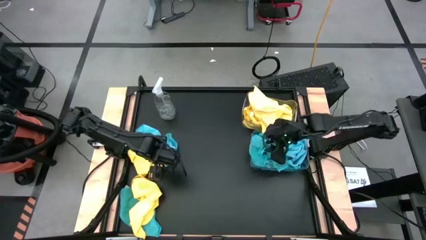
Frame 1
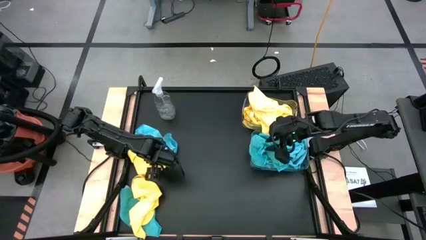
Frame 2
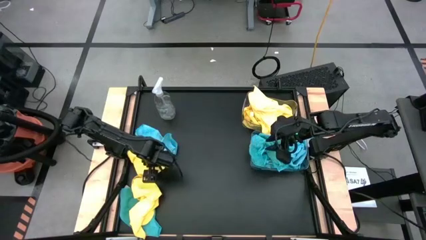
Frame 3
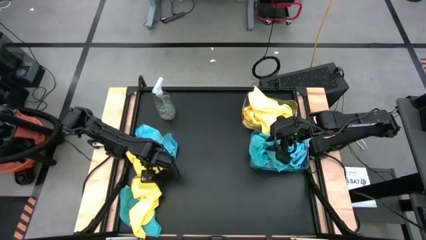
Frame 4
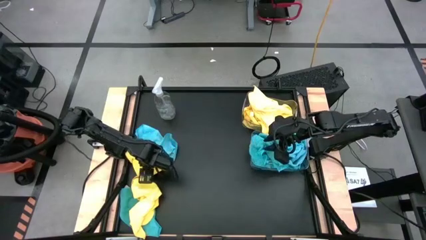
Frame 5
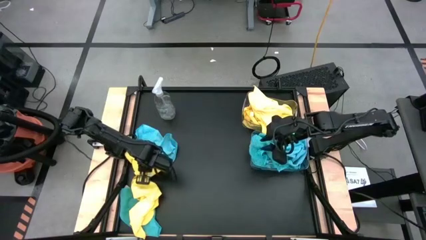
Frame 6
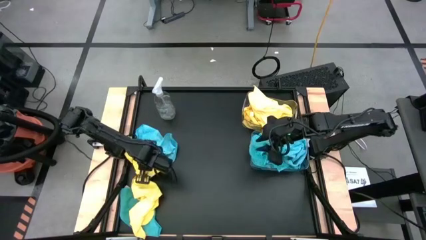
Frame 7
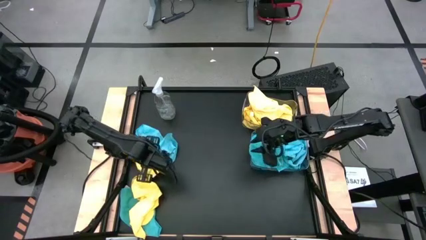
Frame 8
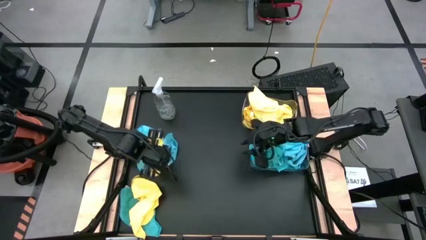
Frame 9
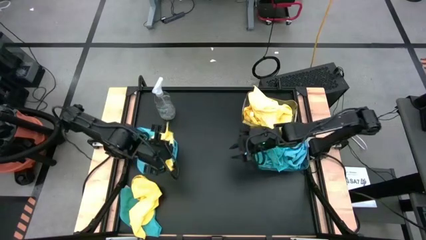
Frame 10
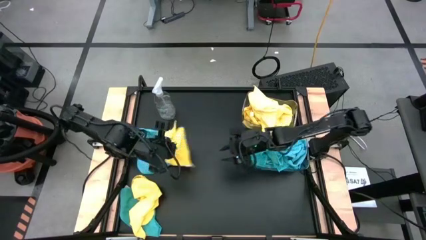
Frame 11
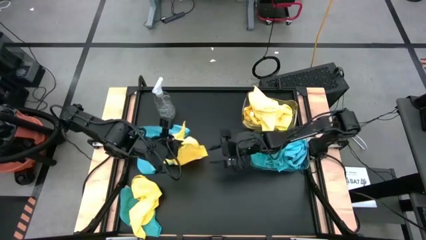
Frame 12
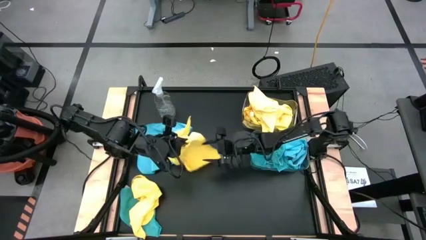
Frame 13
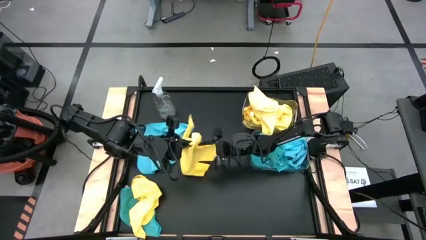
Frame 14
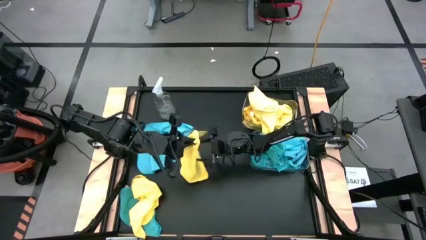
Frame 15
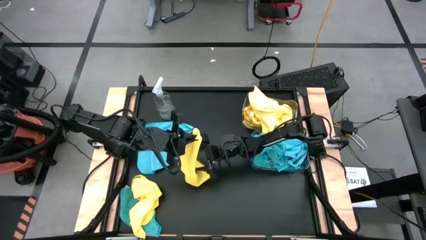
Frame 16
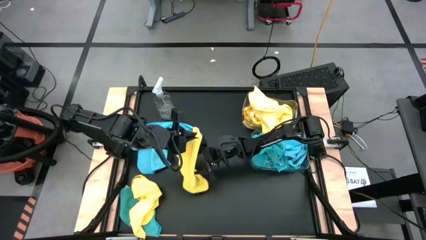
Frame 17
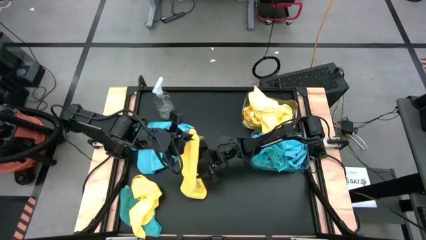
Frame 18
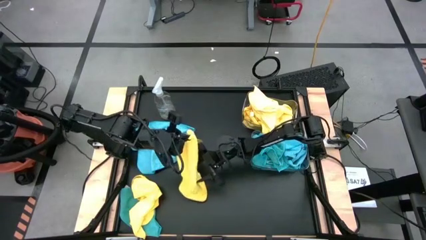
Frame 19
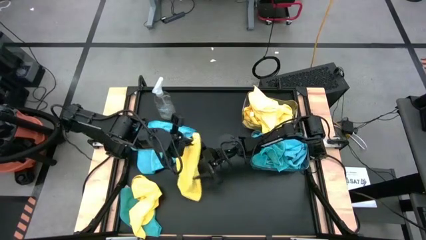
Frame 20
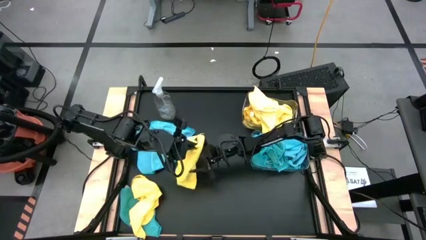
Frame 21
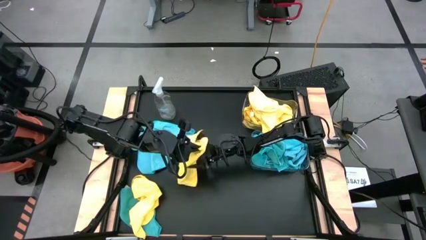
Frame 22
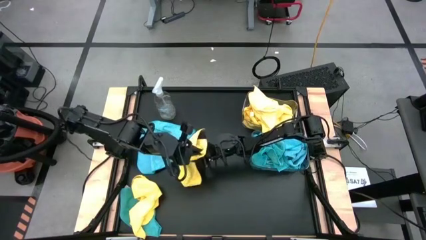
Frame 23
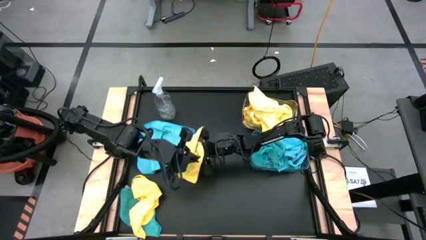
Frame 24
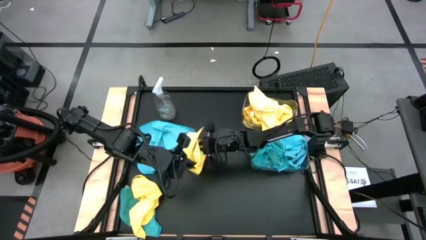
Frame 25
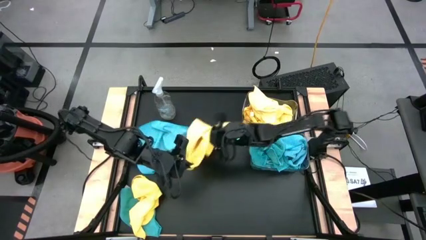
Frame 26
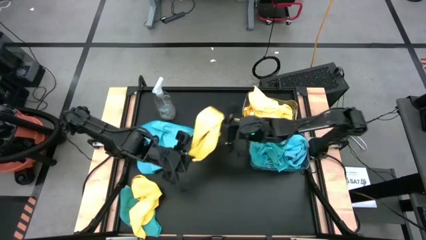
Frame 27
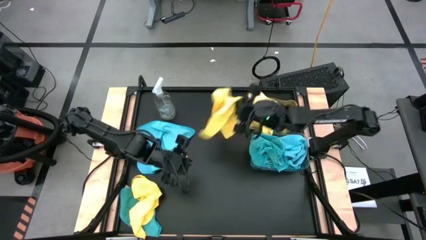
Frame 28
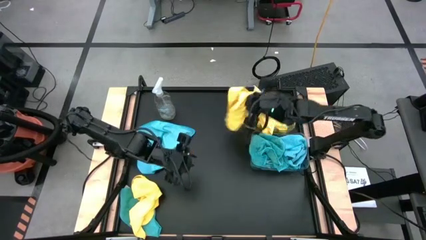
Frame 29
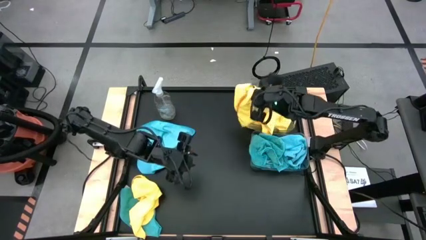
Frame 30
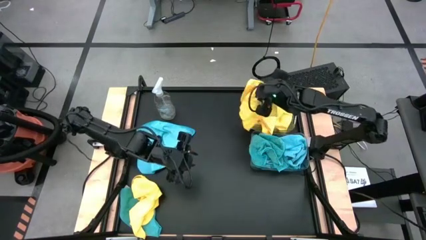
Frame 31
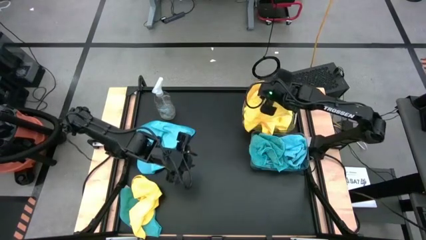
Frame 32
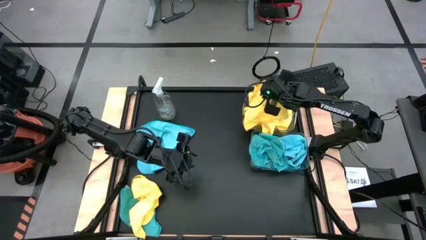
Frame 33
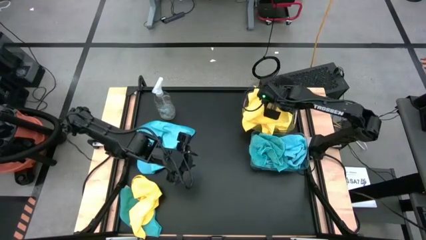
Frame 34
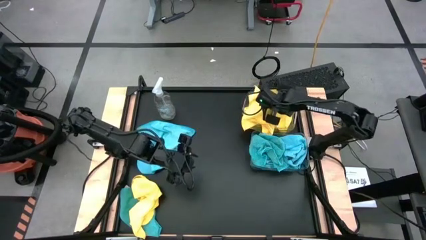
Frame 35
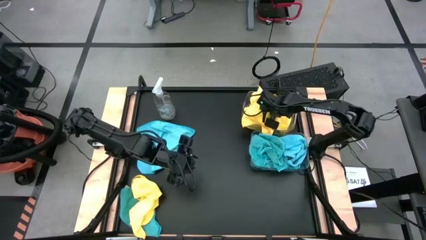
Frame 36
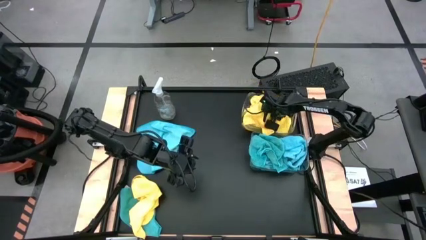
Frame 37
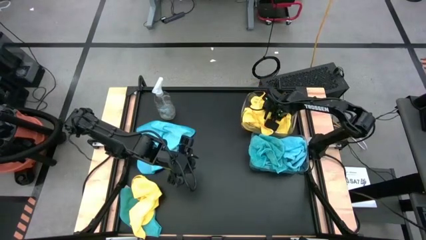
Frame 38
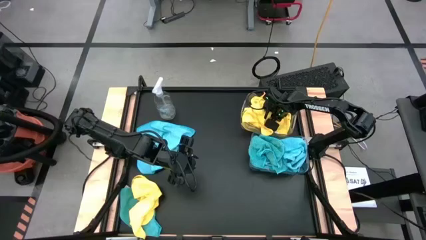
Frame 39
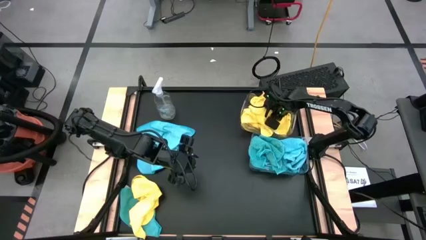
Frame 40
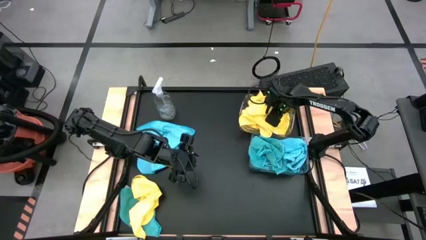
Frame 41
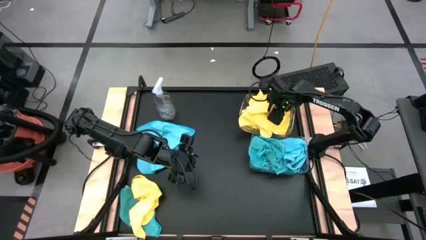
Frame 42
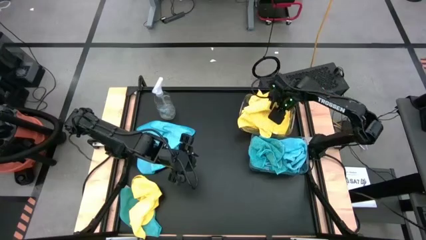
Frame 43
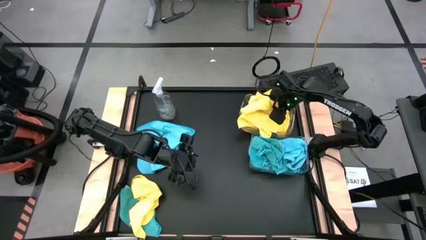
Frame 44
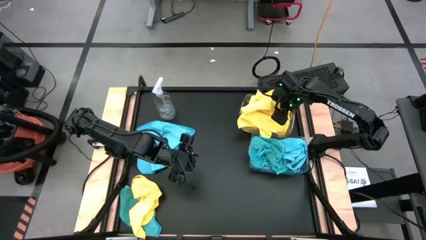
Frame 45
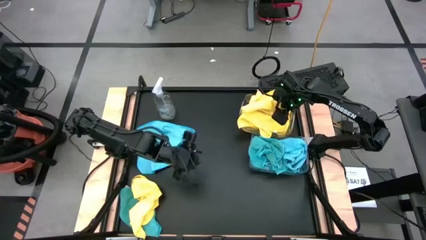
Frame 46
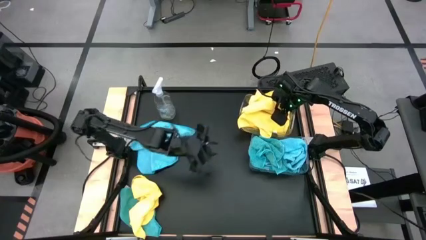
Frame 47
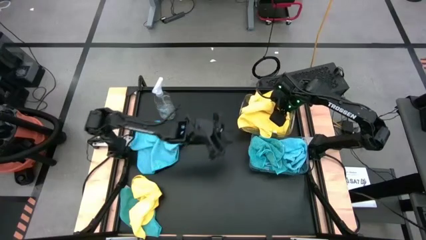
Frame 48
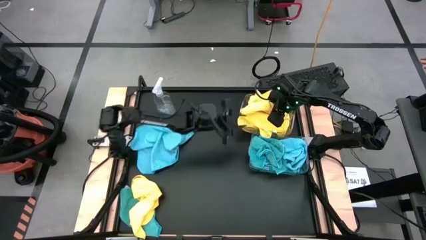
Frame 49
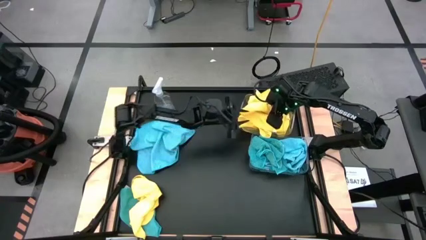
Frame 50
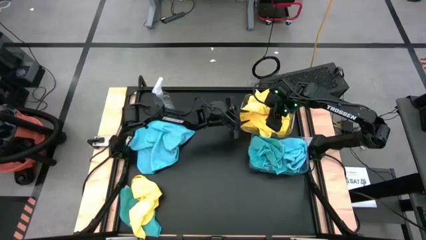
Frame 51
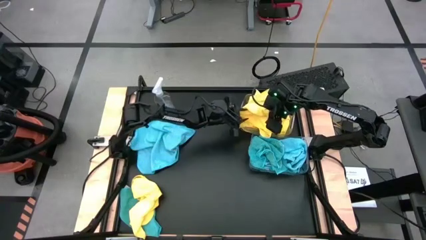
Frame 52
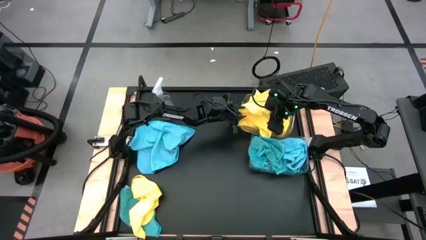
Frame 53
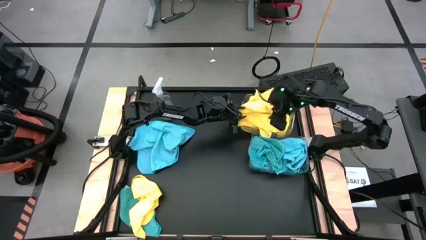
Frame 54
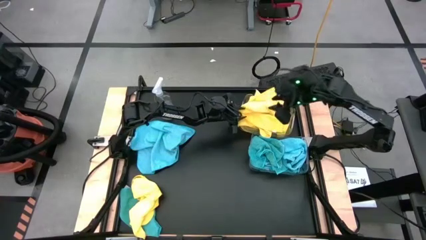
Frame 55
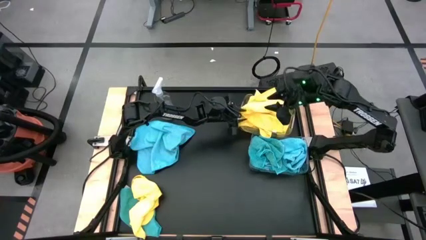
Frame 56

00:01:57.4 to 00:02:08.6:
Task: Sort microfiber towel by color & place in baskets
Put the yellow microfiber towel into the top transparent bin
